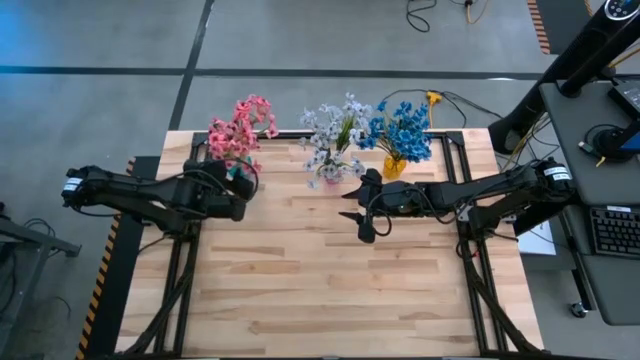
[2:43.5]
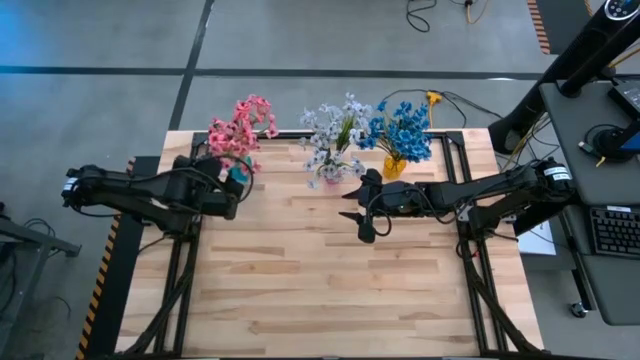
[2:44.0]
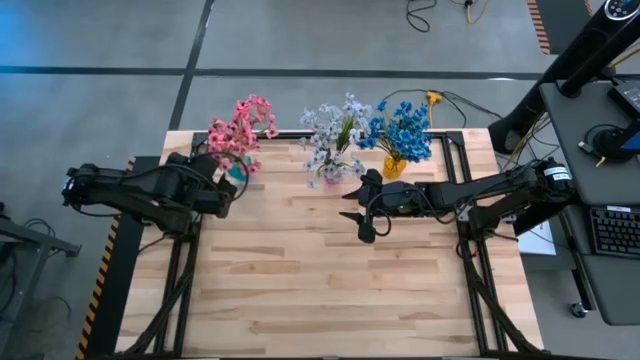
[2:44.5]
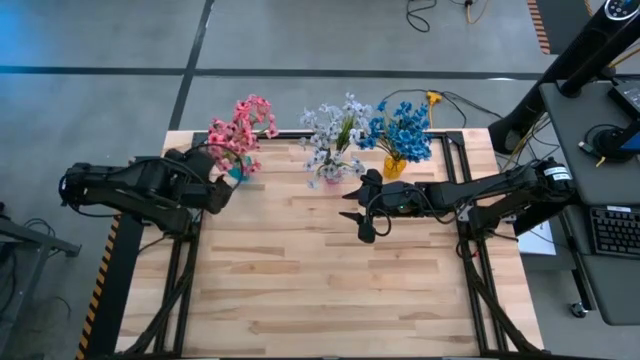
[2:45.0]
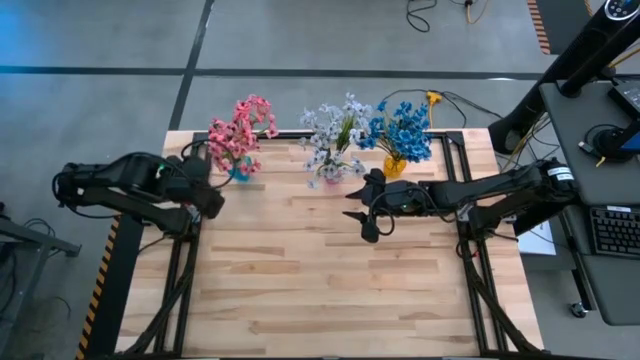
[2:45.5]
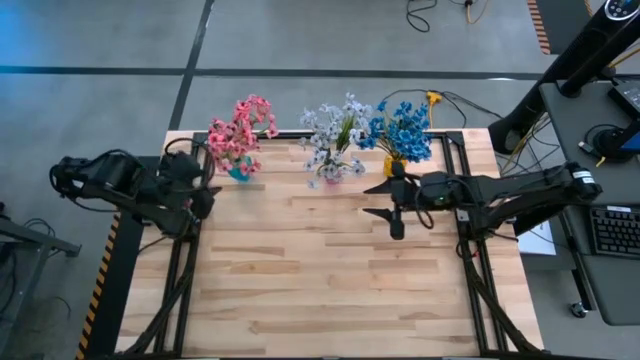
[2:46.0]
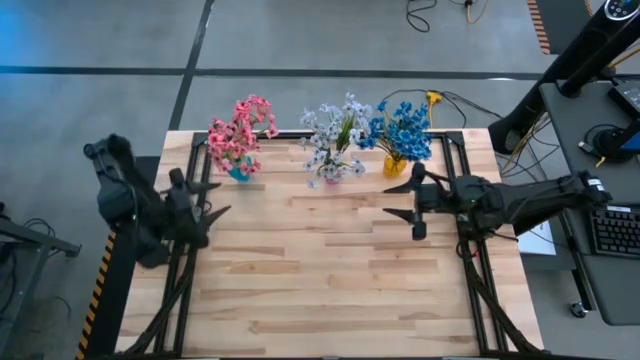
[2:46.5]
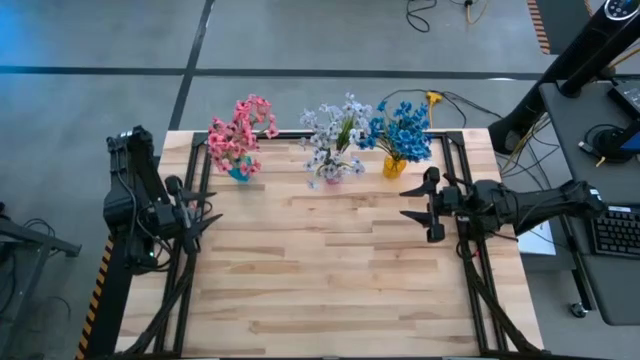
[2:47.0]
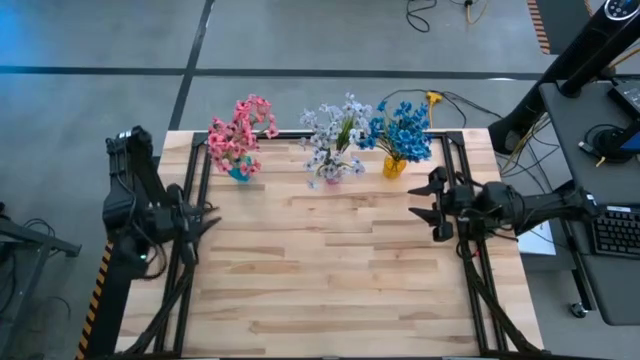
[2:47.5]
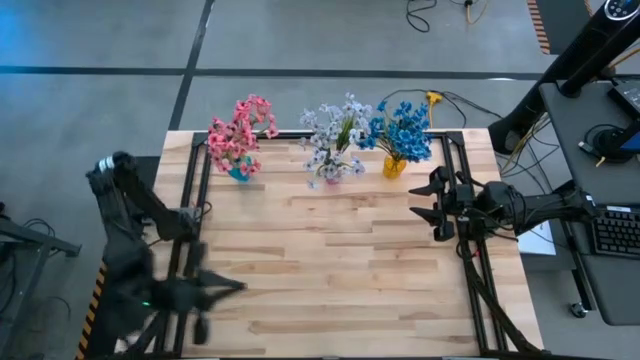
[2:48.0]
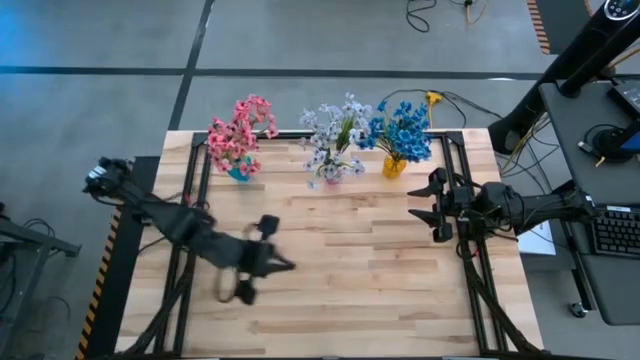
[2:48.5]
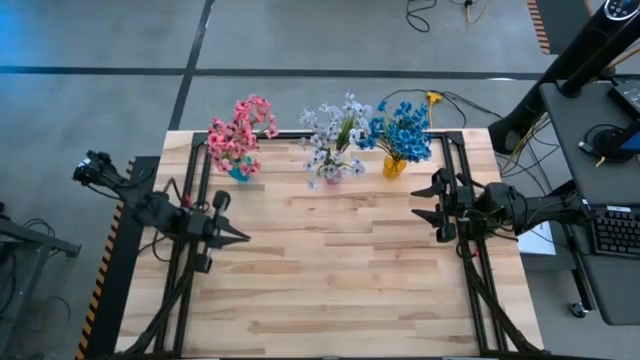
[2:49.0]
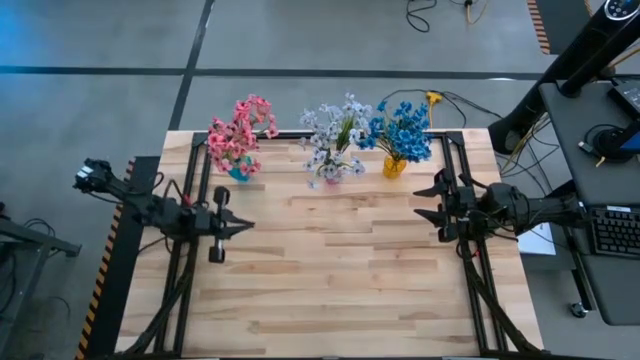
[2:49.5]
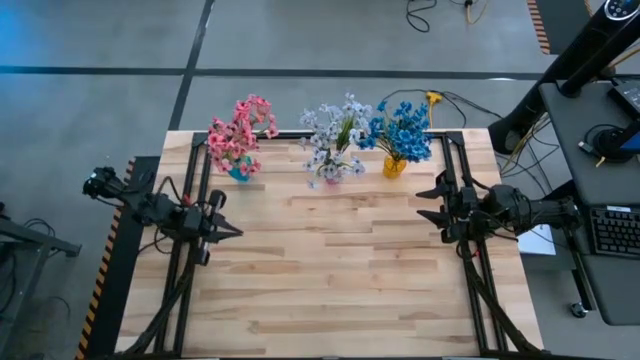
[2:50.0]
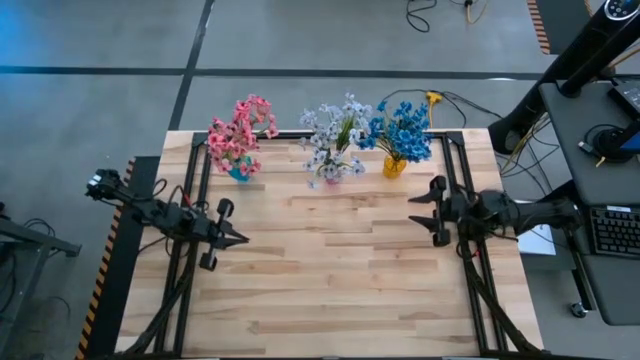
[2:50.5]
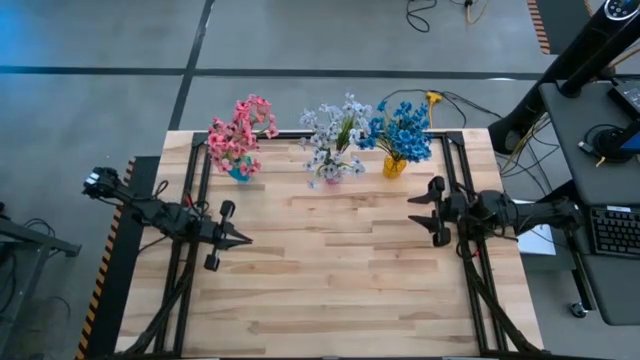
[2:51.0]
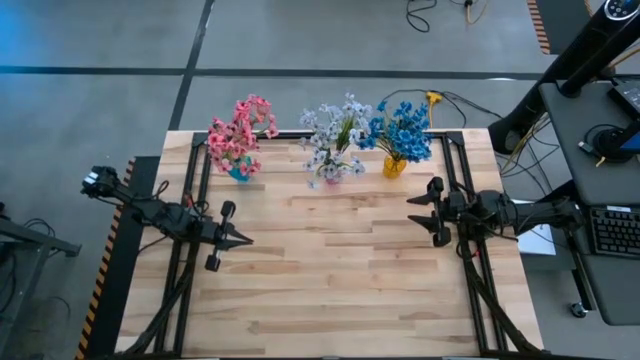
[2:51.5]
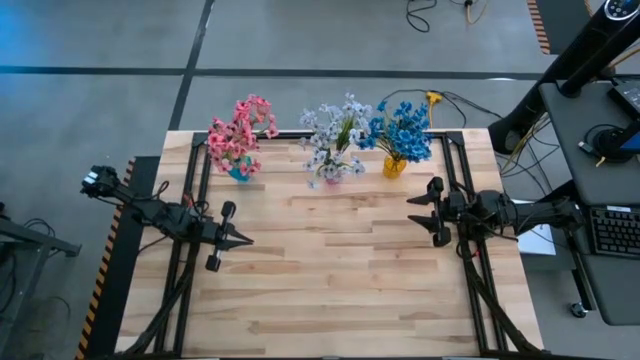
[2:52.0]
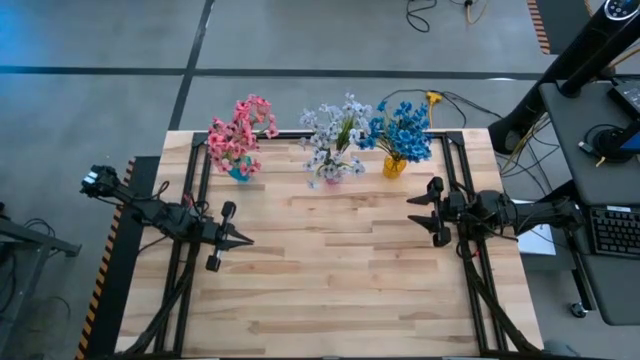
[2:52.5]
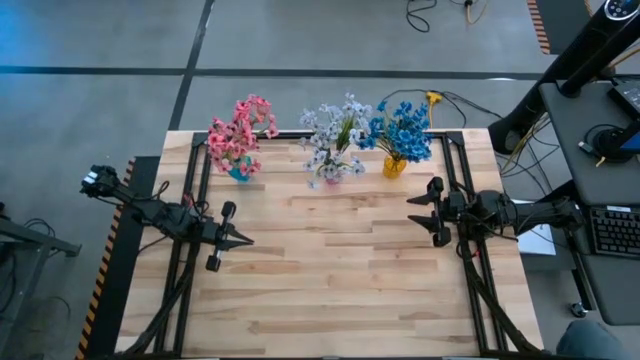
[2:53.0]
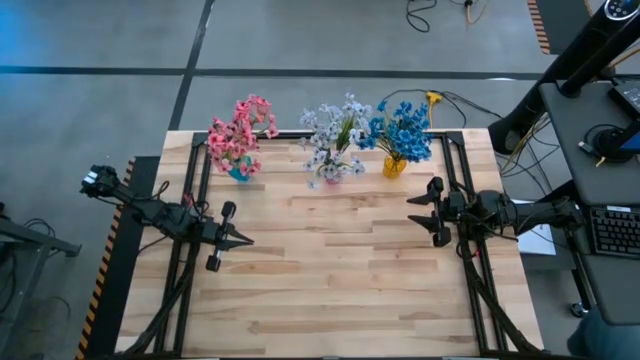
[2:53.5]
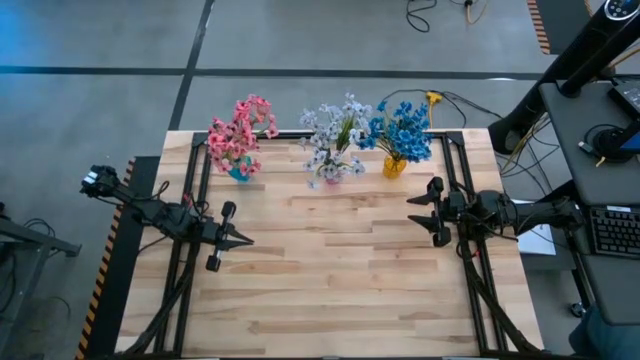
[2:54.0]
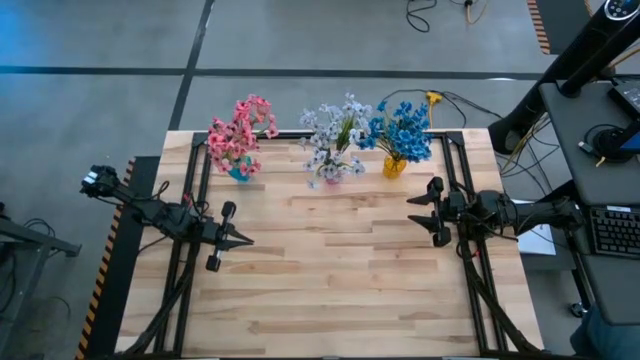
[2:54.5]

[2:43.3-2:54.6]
Task: Sort flowers into vase by color
Return to Home Position

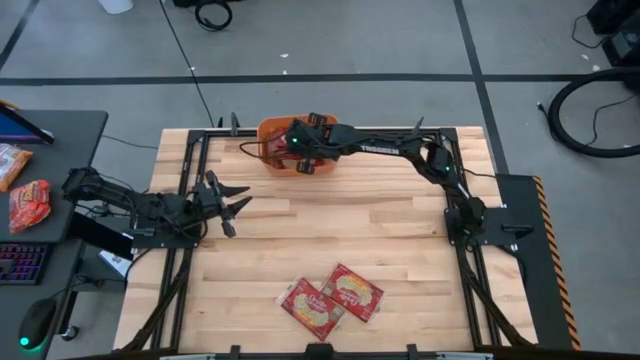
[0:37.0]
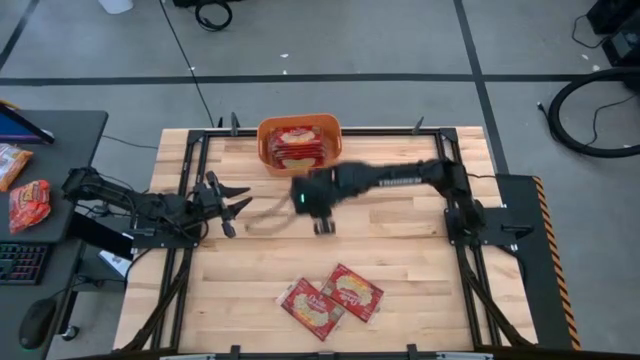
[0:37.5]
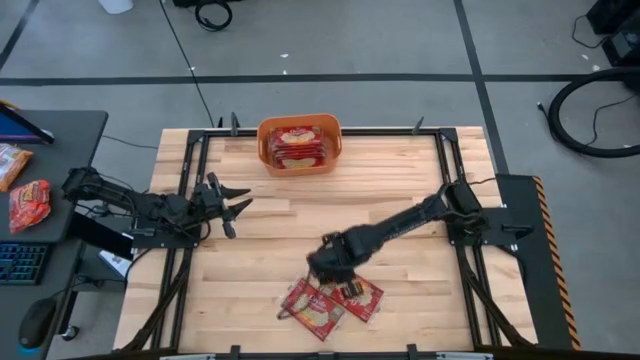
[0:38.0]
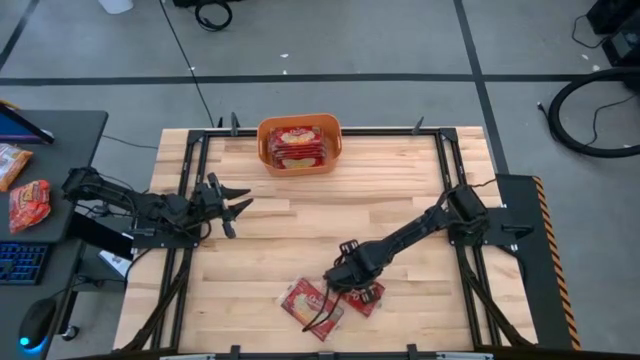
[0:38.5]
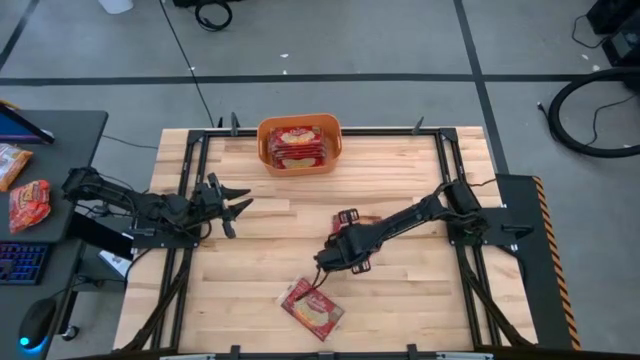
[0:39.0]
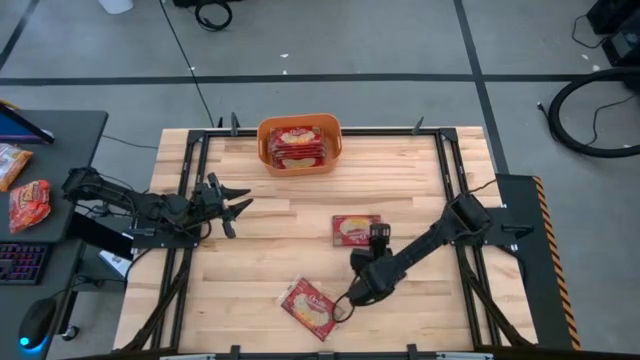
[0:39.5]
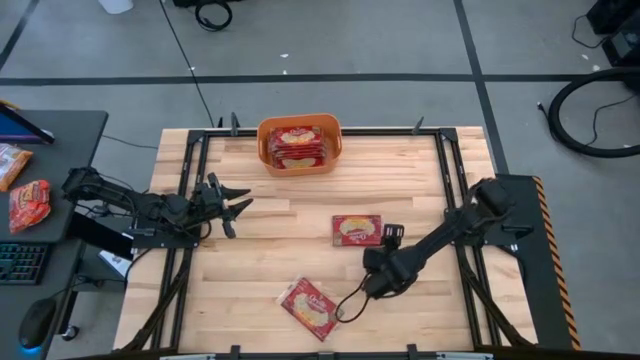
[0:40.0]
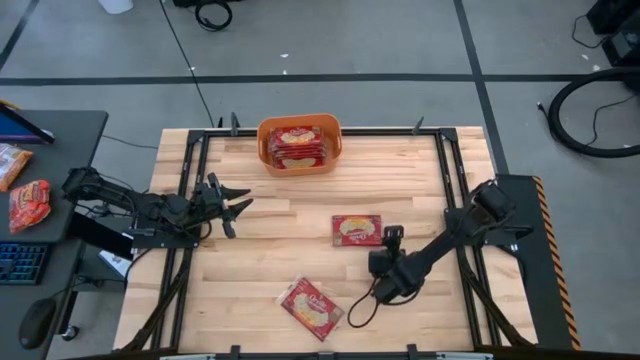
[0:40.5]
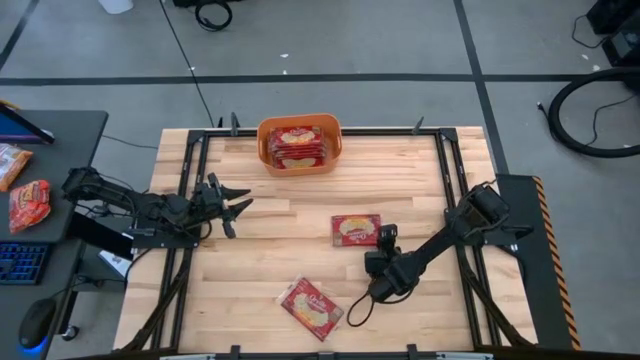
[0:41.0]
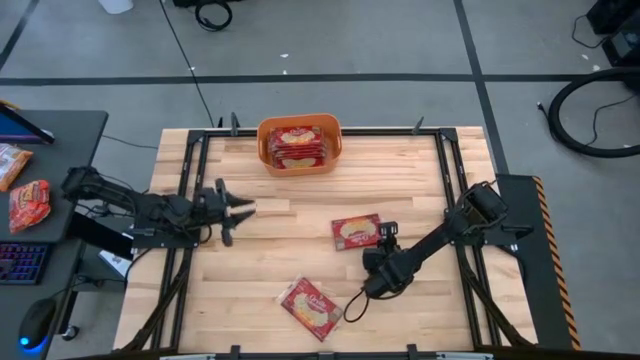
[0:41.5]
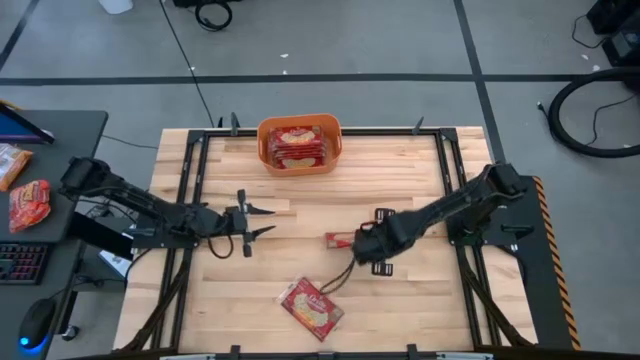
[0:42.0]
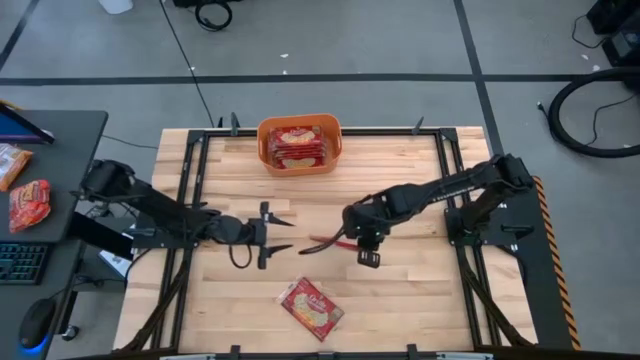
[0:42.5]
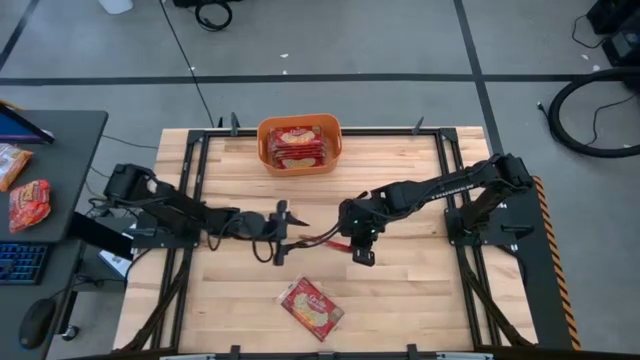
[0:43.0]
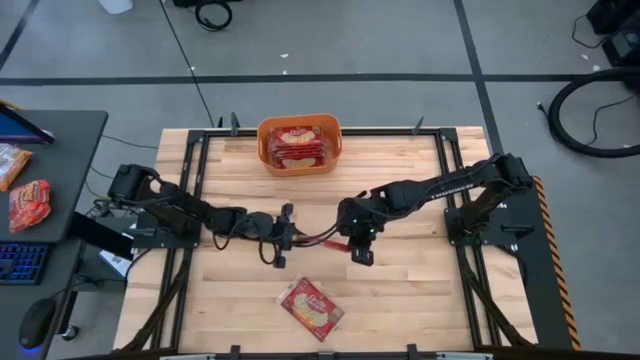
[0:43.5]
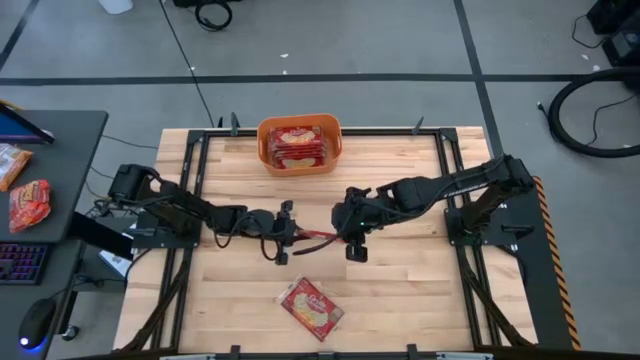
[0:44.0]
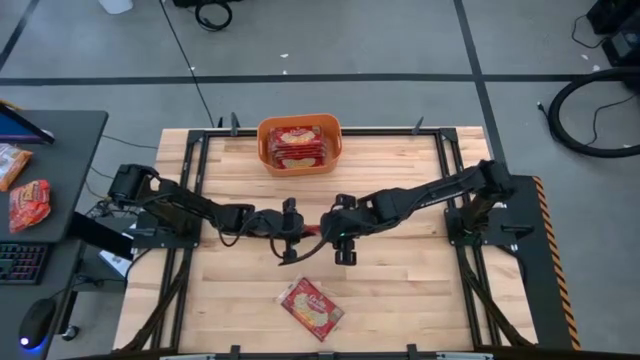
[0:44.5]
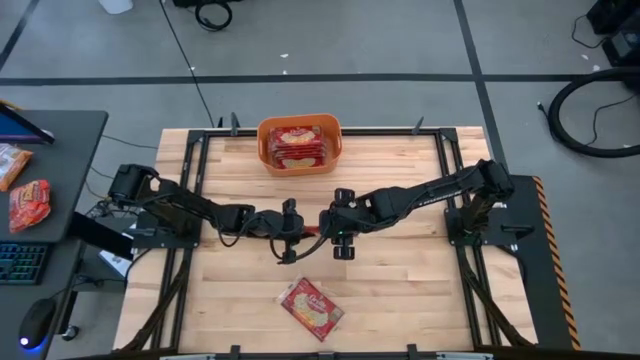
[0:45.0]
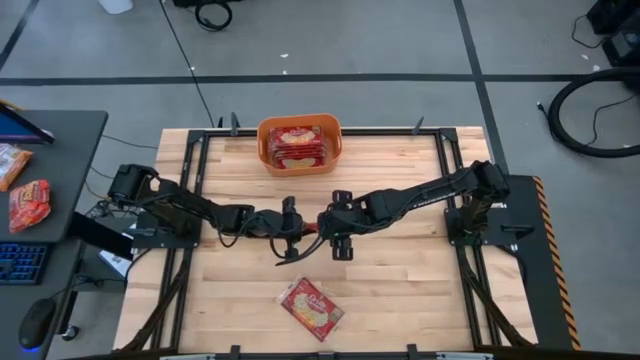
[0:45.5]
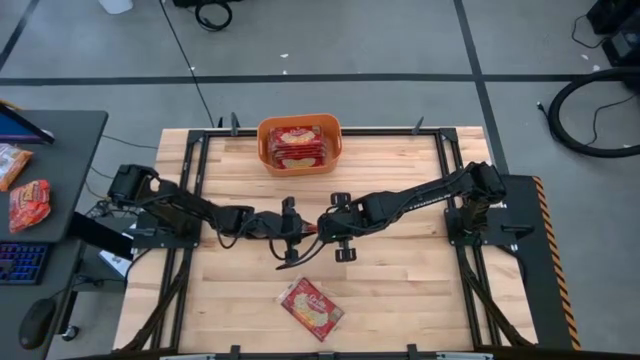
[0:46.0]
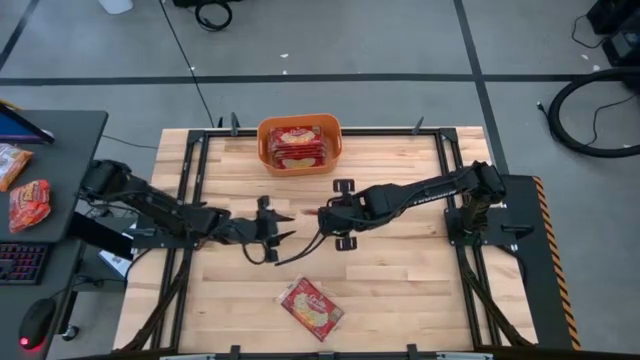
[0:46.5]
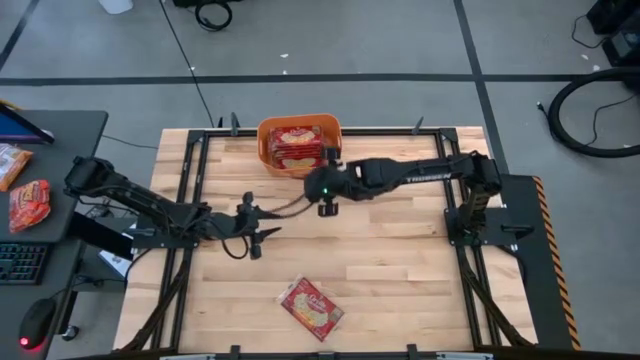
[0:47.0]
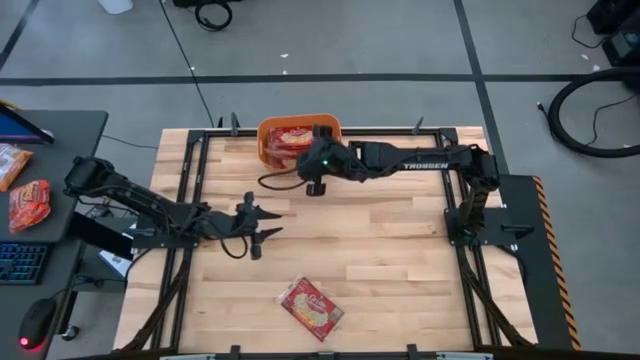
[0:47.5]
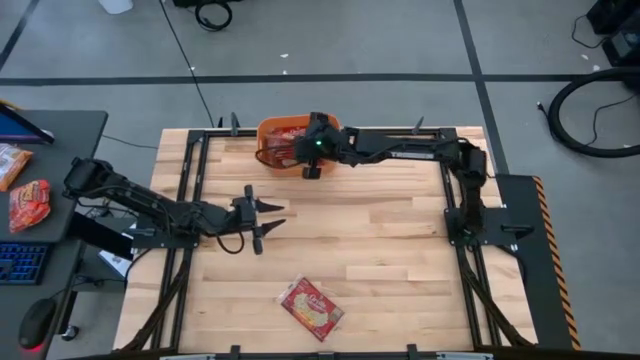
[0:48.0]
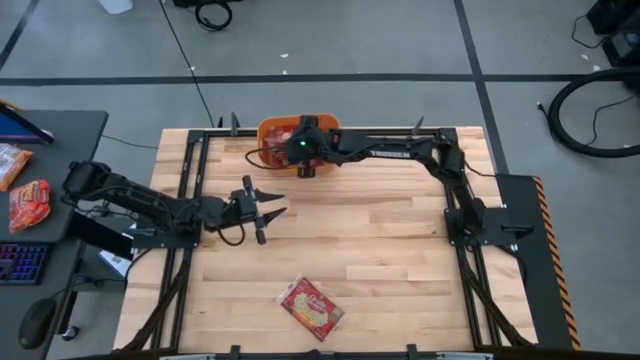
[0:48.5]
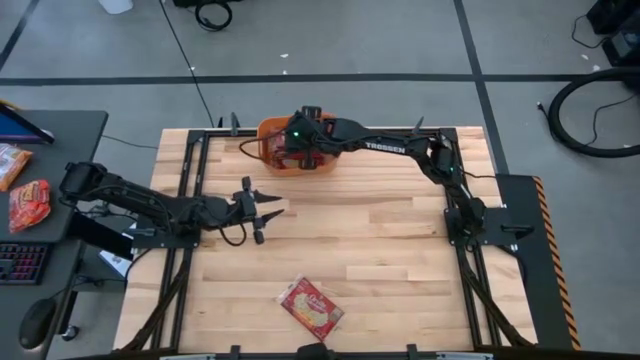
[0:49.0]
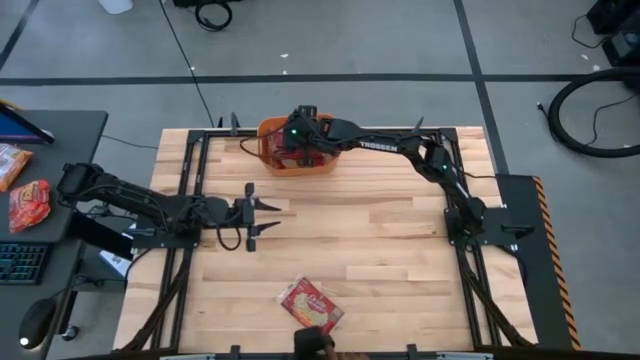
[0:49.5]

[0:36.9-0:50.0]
Task: Sort popcorn bags into baskets
Put the red popcorn bag into the orange bin
